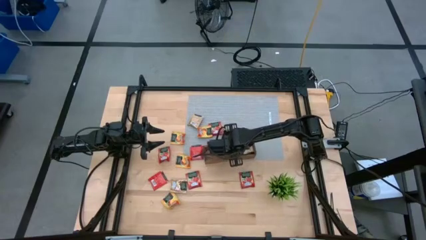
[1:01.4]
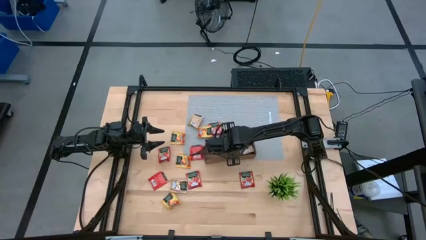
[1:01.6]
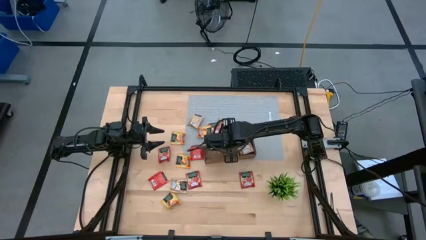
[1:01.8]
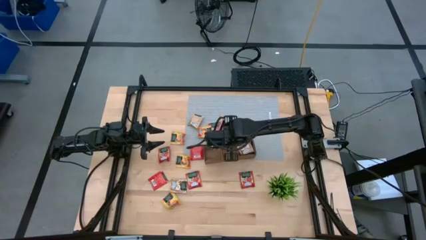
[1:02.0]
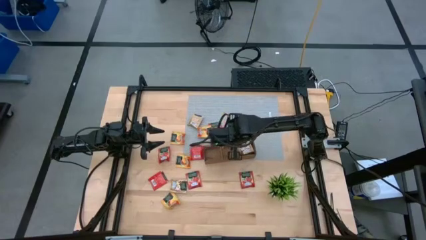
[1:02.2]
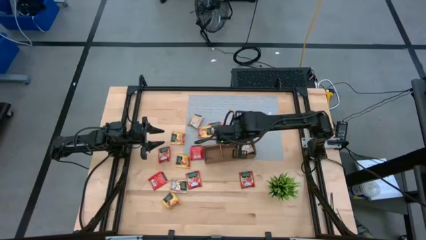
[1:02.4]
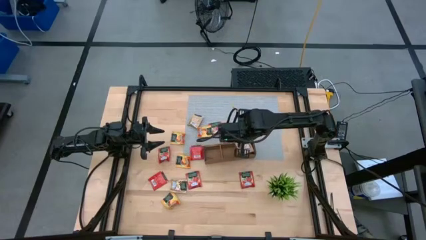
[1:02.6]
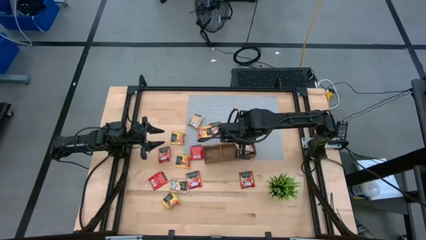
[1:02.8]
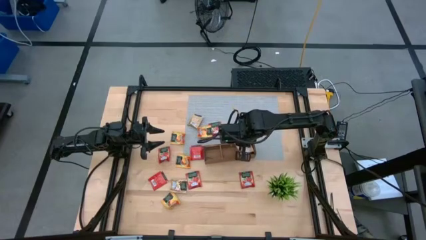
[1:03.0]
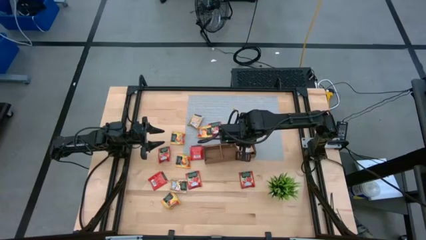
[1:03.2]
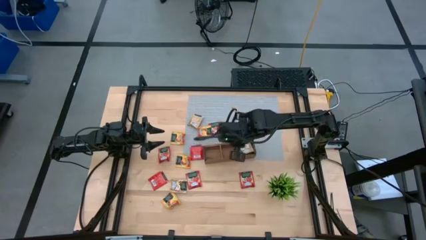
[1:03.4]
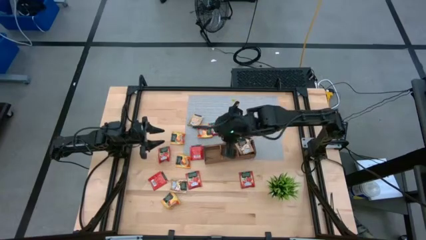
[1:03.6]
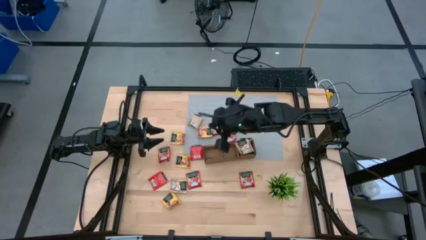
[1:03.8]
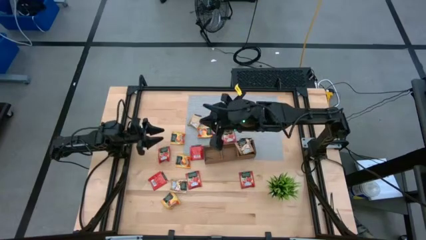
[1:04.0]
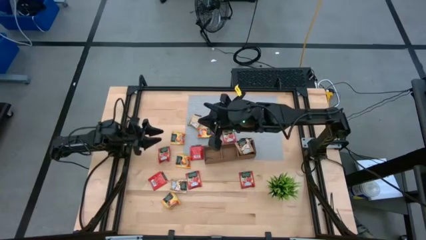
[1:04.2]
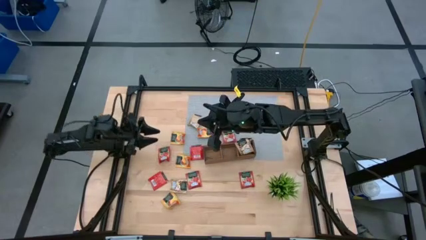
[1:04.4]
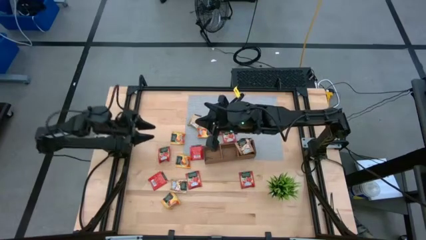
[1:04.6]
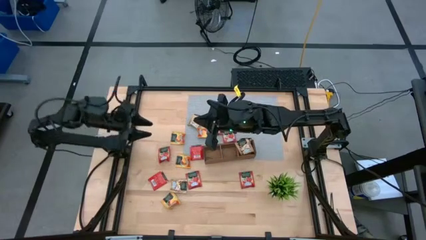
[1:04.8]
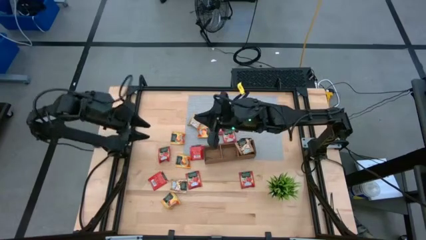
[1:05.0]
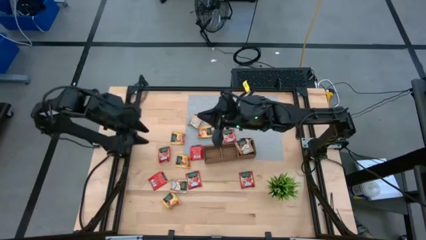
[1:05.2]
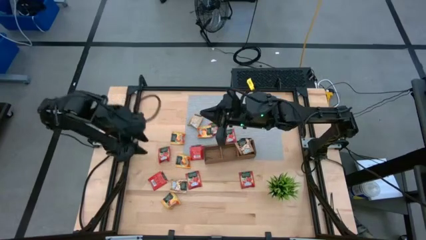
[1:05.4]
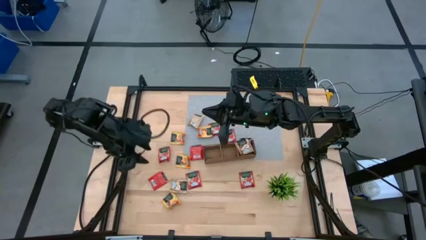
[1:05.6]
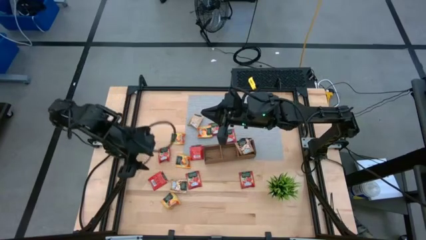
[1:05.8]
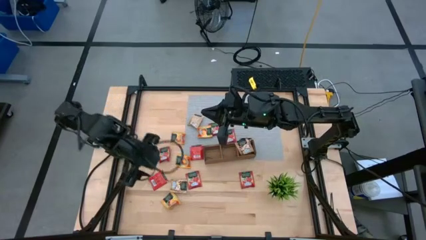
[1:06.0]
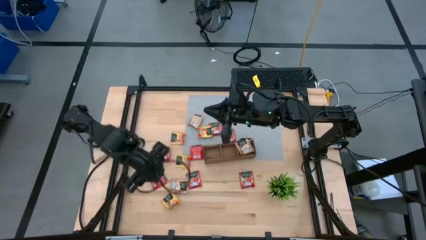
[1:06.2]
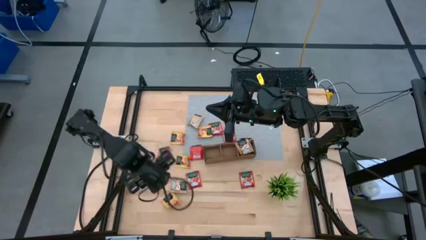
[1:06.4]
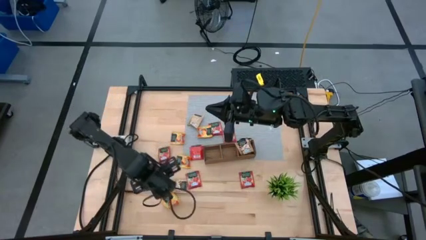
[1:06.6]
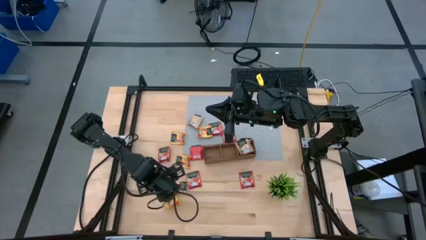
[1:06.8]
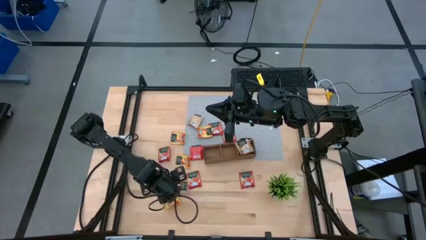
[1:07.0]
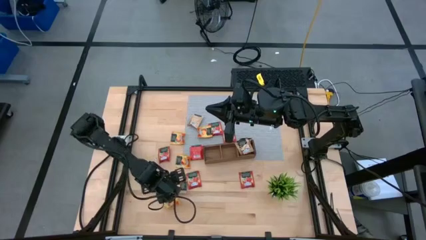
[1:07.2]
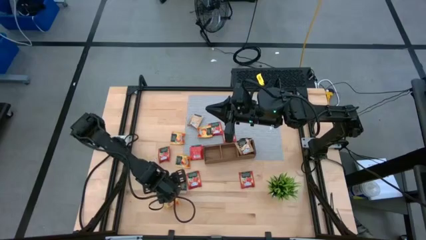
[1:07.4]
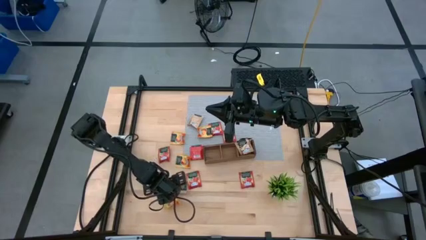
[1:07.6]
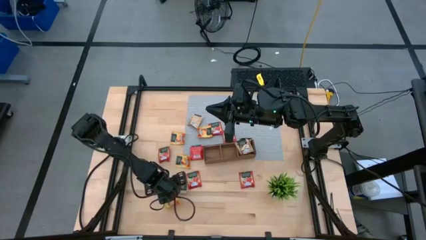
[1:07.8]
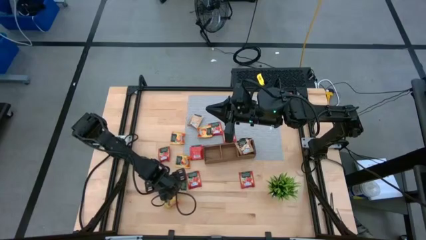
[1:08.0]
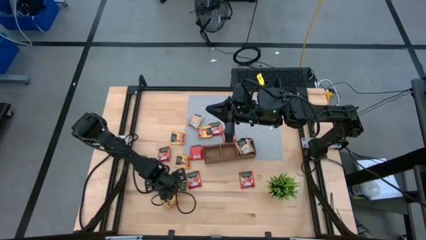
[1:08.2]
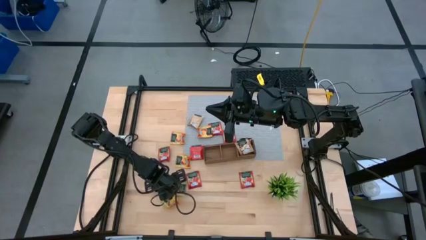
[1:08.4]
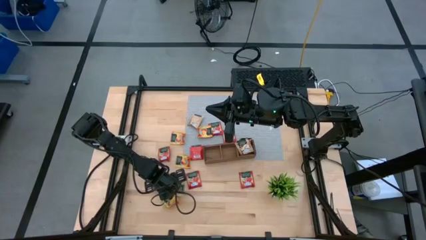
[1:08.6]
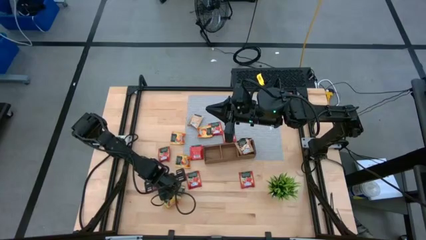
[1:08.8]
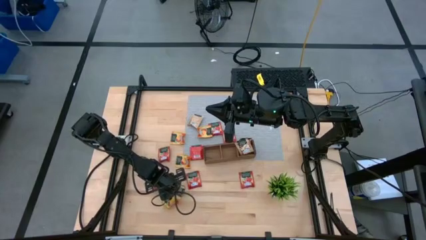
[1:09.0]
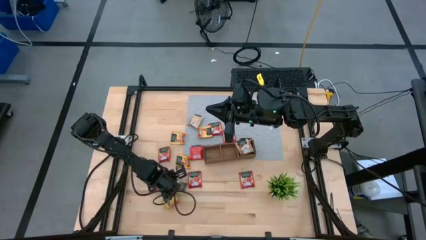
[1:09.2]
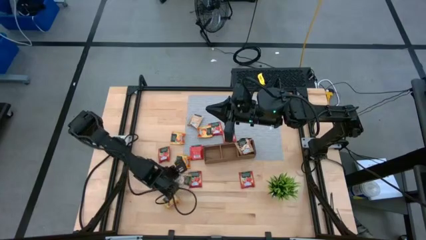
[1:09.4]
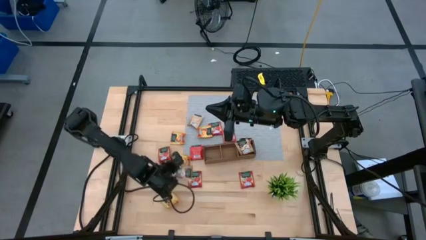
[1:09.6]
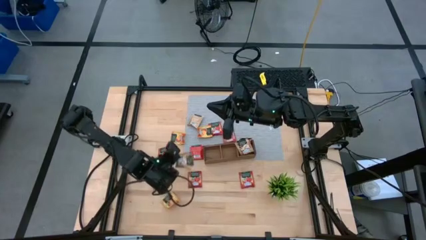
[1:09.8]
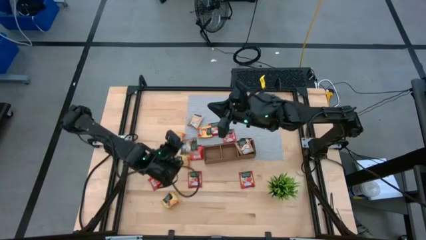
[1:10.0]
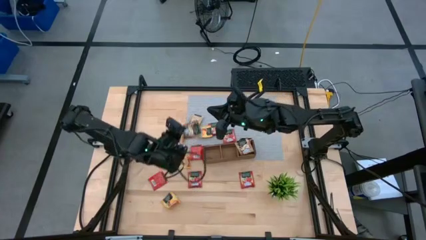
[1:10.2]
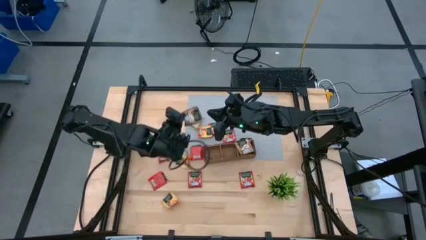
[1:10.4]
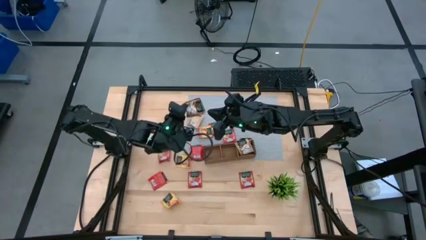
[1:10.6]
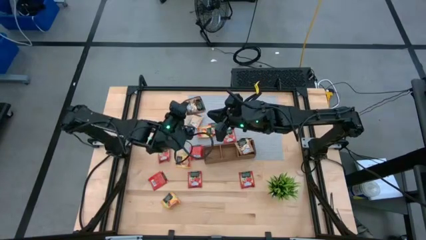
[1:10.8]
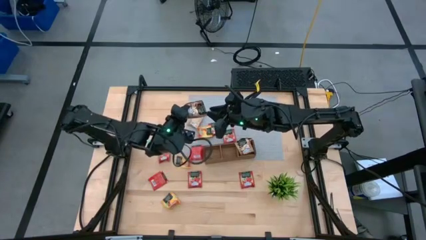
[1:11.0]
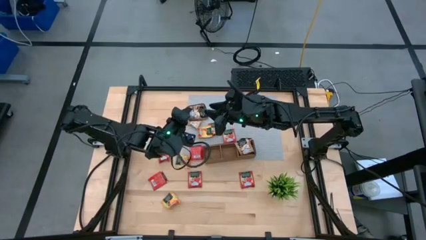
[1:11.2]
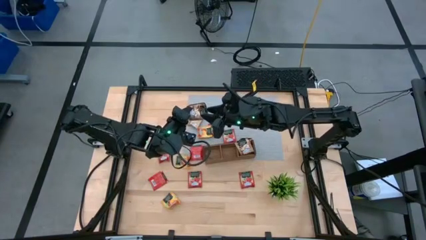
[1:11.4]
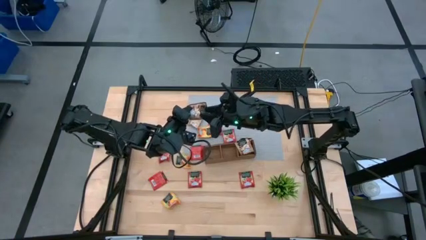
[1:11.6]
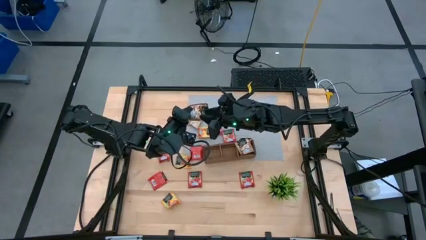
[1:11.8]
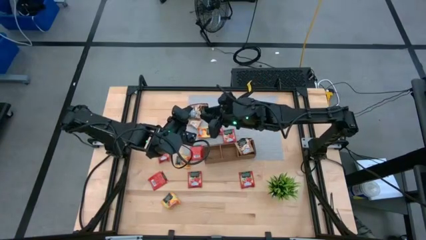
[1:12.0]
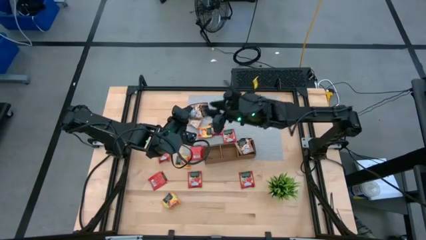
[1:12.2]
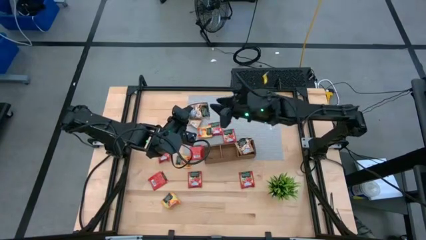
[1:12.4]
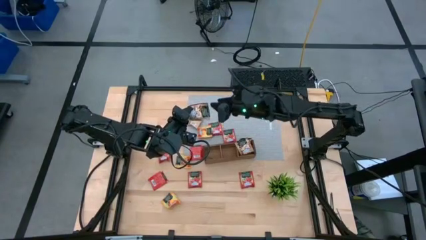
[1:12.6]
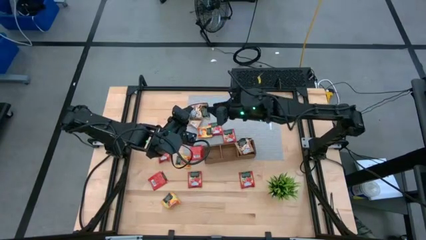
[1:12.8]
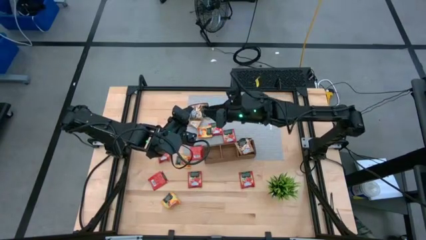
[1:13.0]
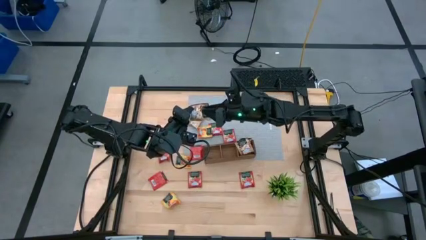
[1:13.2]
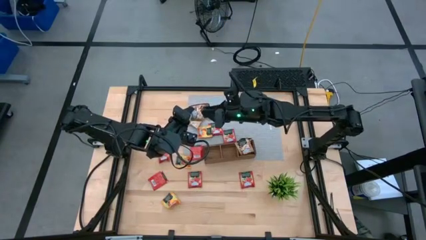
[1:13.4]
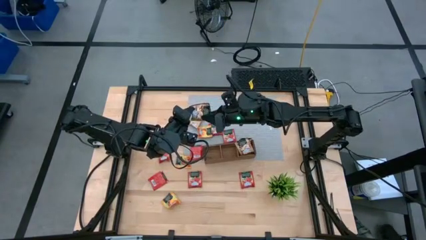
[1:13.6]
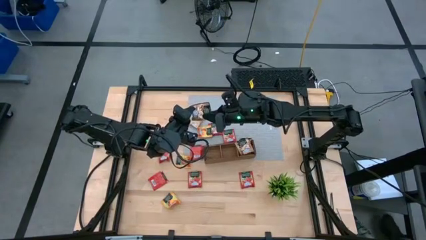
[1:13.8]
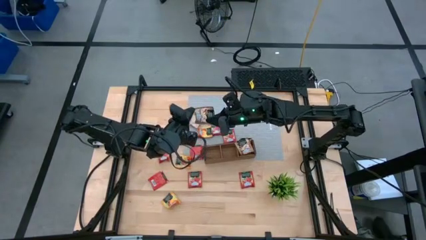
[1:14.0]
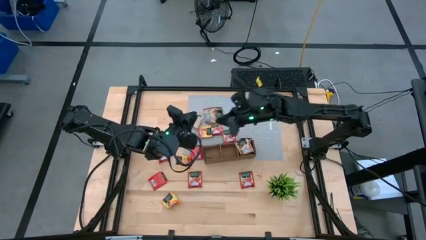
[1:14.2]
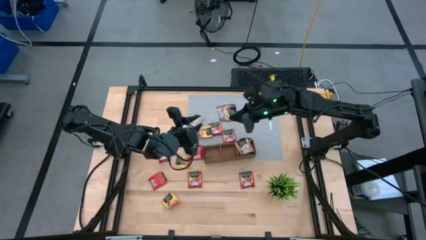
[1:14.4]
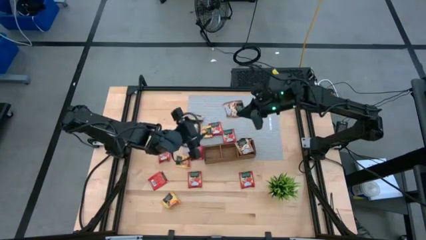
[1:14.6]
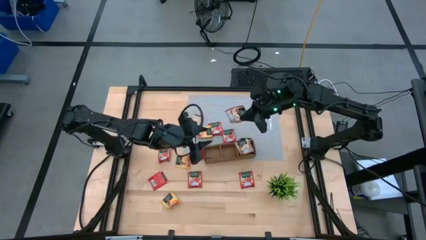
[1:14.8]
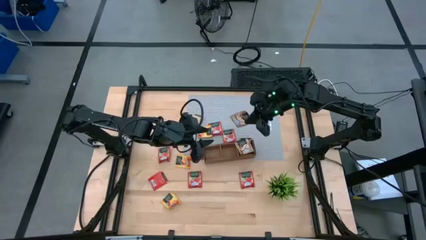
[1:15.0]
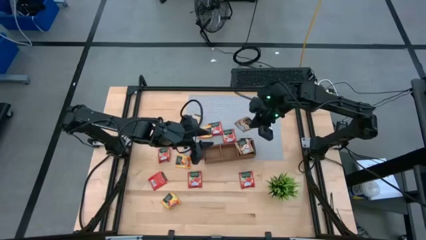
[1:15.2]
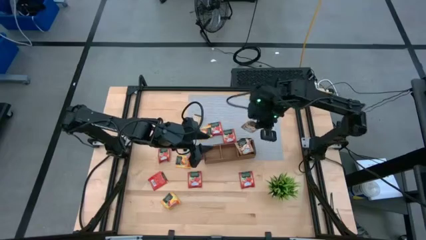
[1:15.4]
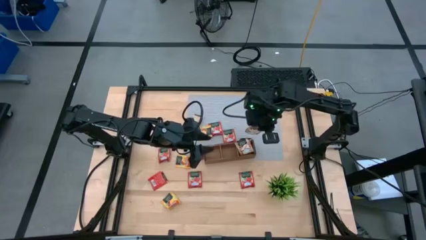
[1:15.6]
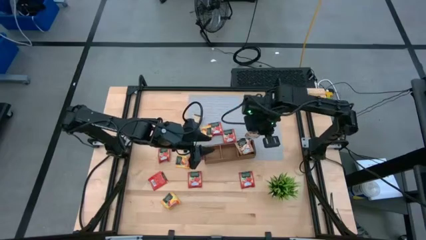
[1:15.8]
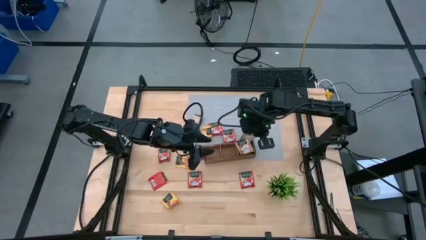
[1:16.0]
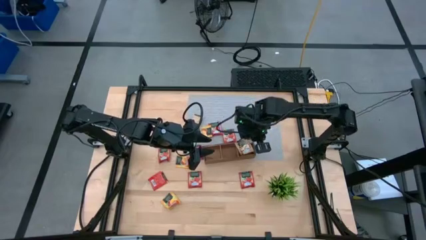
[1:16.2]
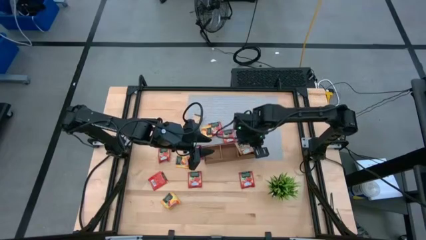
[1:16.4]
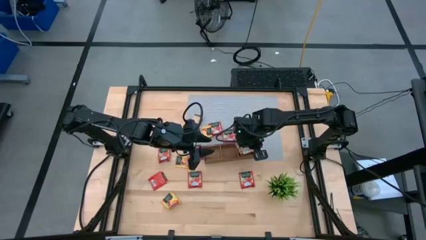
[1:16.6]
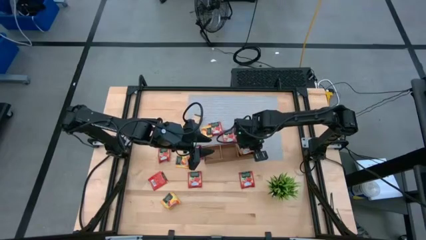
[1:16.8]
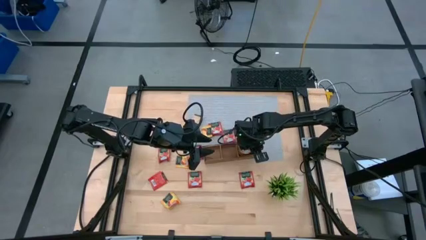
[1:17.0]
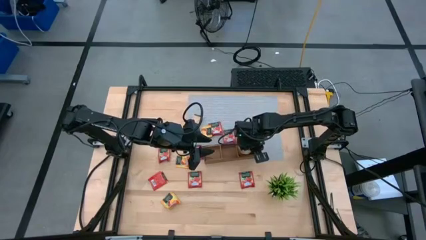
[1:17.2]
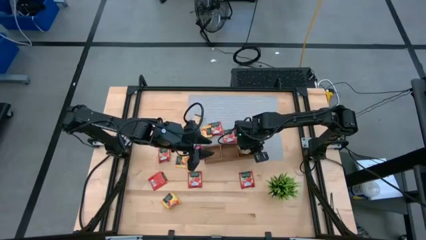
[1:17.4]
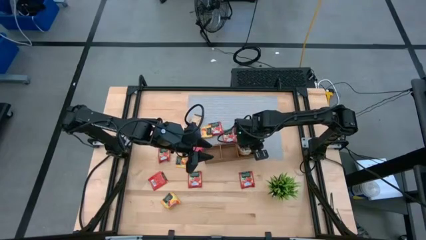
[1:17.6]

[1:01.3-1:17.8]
Task: Pick & Place Tea
Put the brown tea bag into the right section of the wooden organizer
